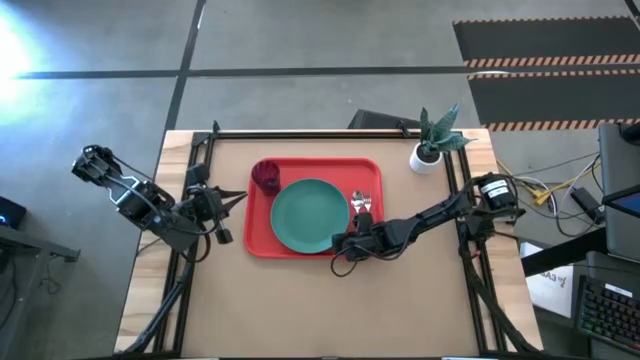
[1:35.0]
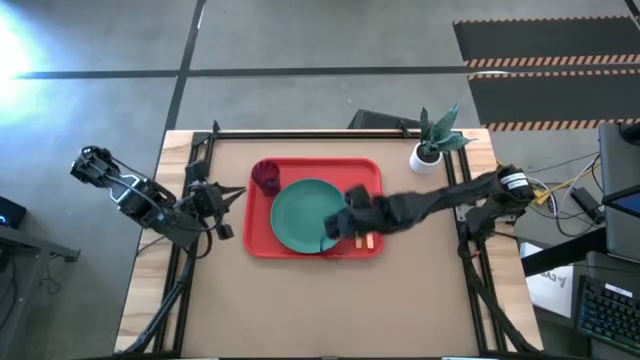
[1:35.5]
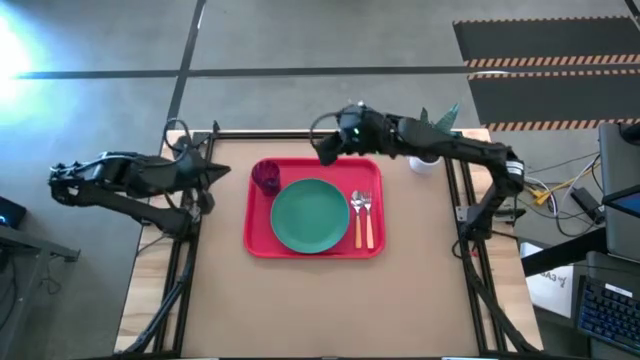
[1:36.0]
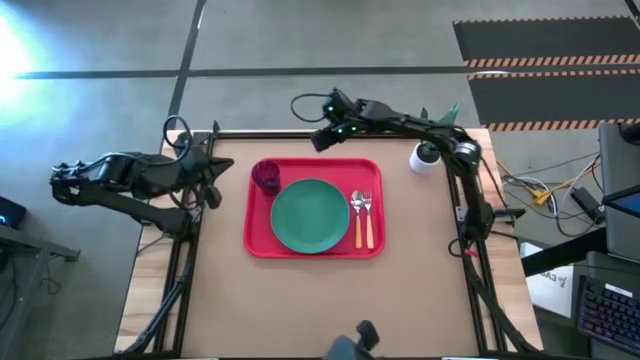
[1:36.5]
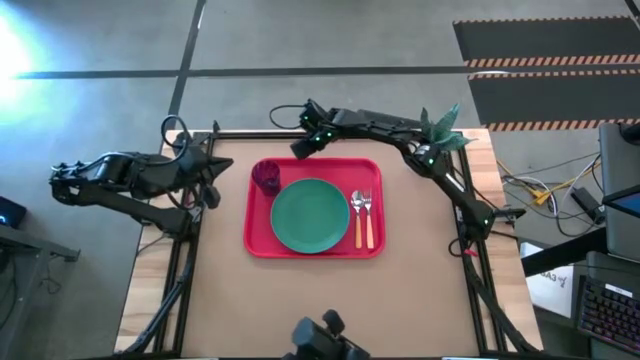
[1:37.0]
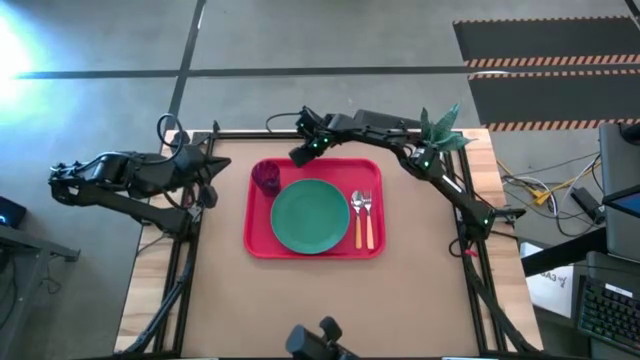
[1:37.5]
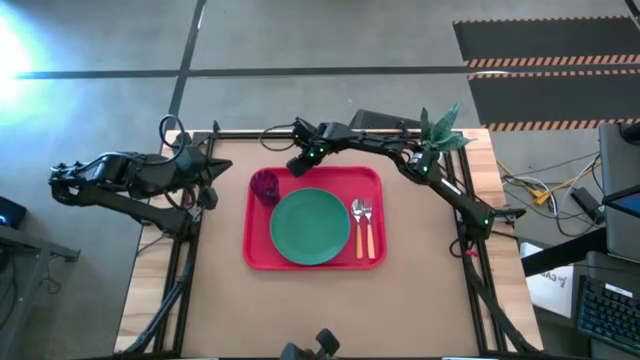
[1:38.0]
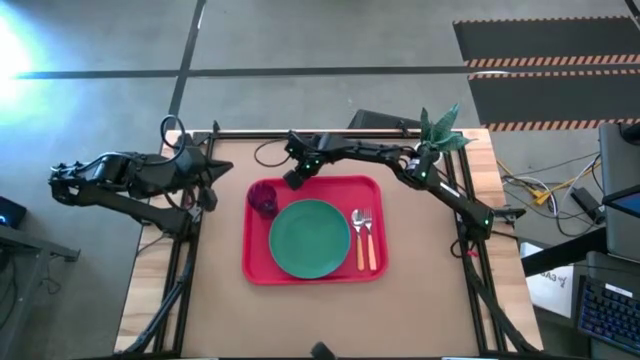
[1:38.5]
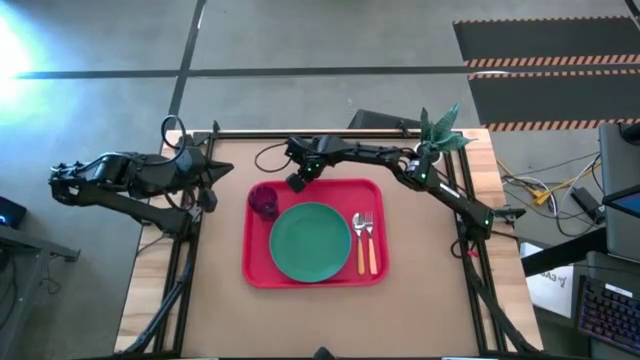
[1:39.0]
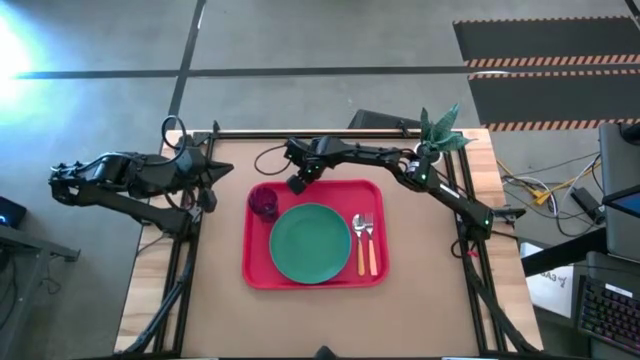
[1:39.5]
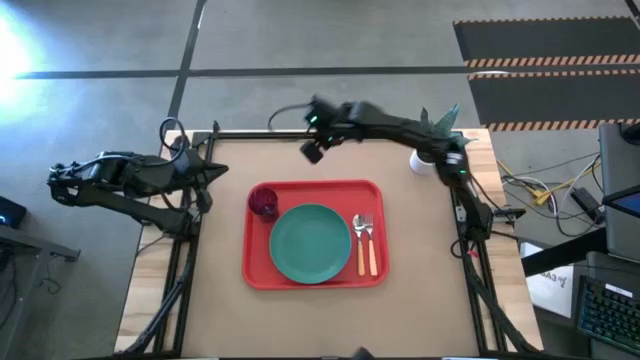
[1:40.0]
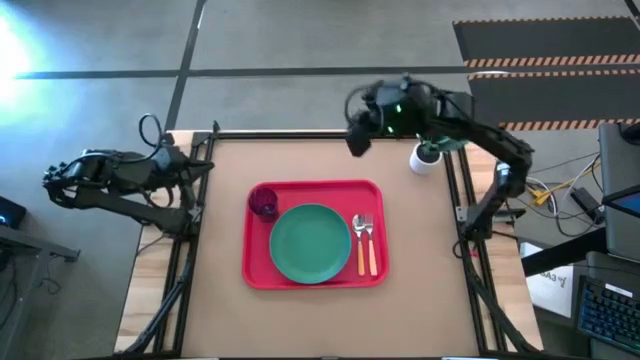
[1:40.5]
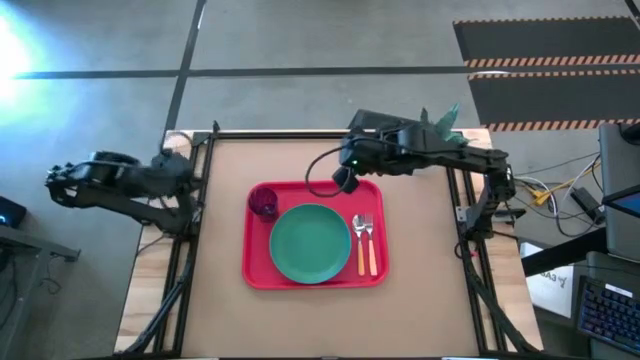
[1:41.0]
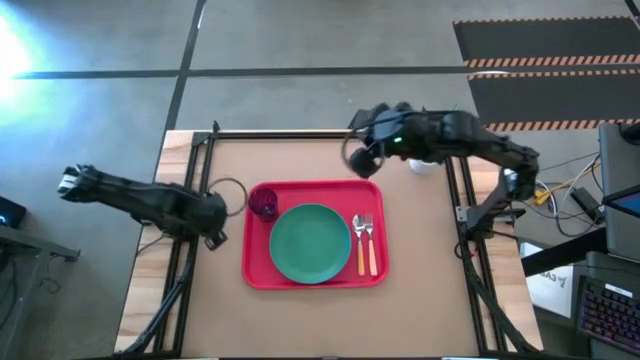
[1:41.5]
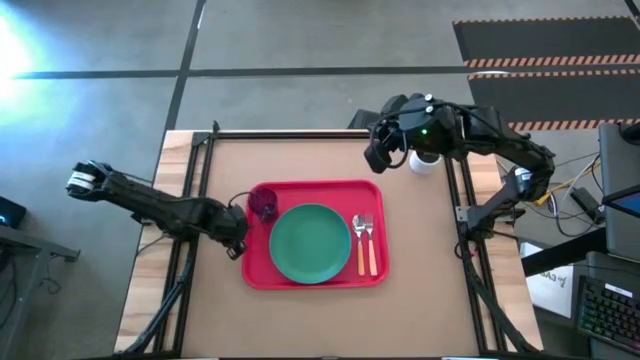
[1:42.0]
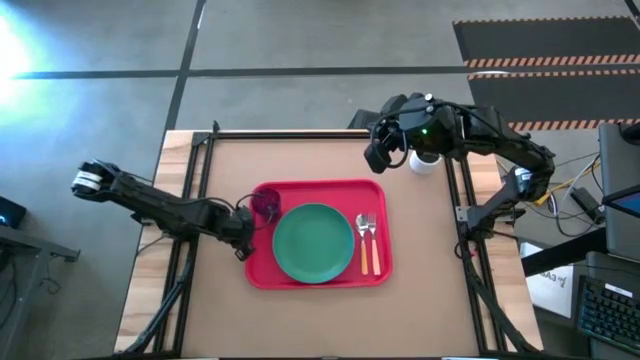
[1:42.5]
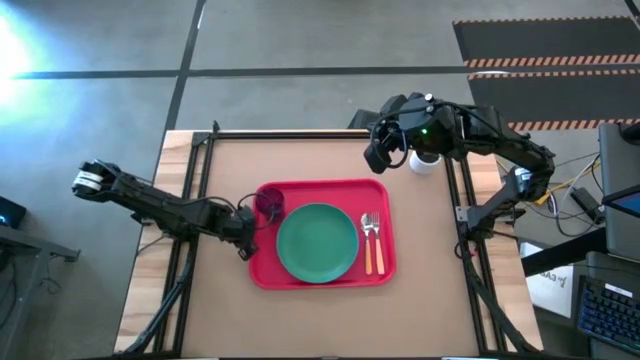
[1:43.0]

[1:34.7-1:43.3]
Task: Pick and place plate/cup/fork/spoon on tray
Move the orange tray to the center of the table

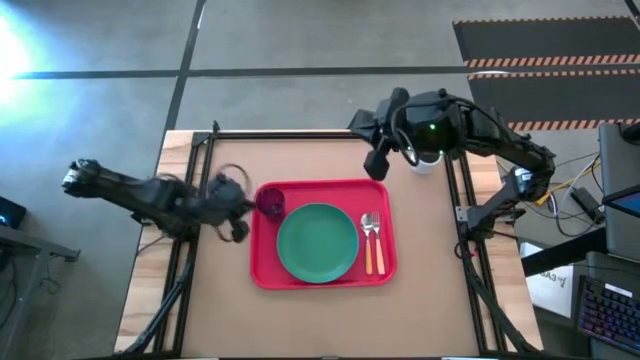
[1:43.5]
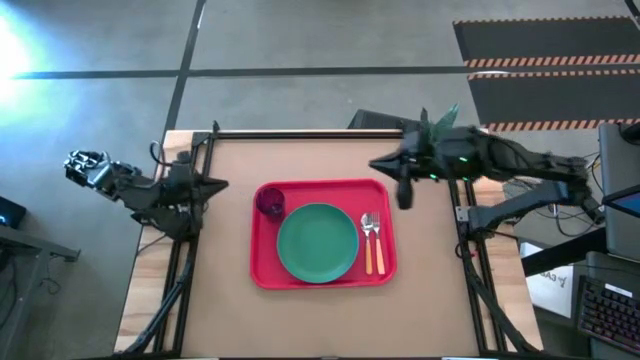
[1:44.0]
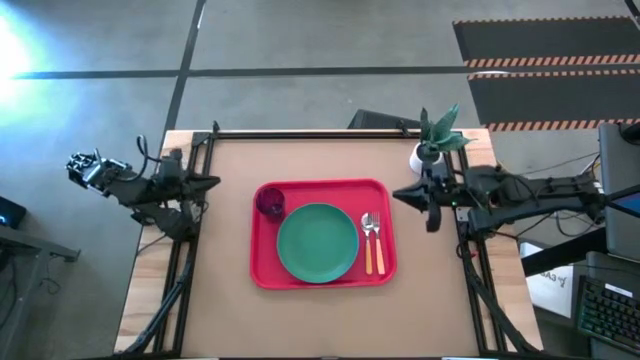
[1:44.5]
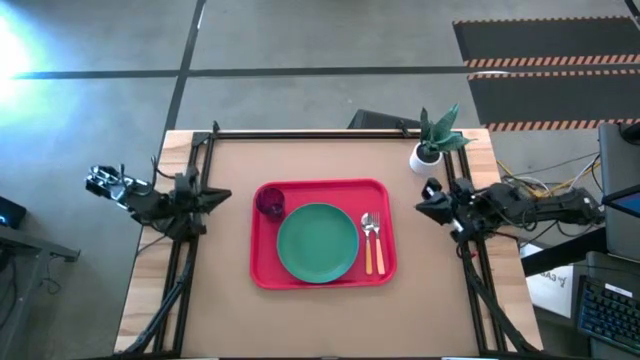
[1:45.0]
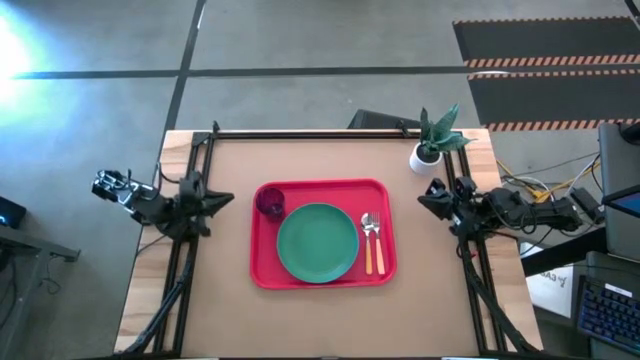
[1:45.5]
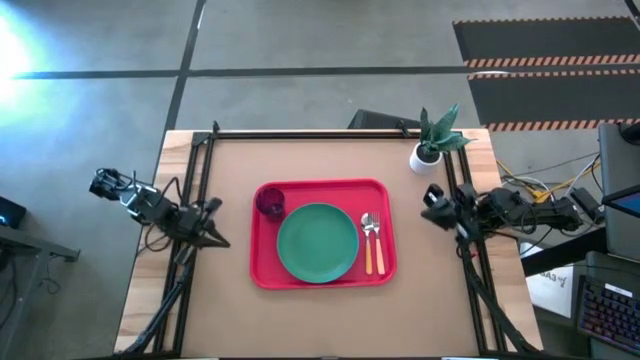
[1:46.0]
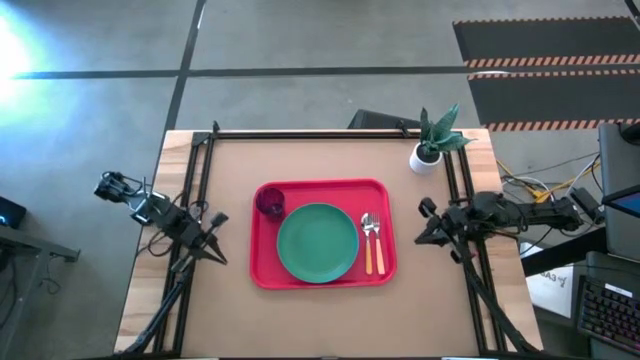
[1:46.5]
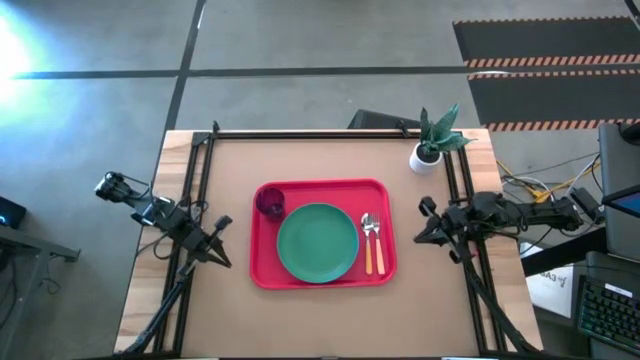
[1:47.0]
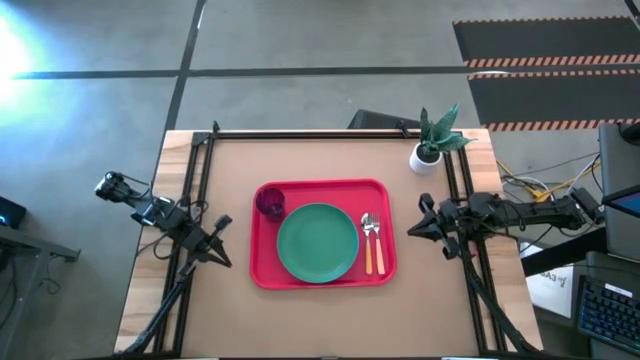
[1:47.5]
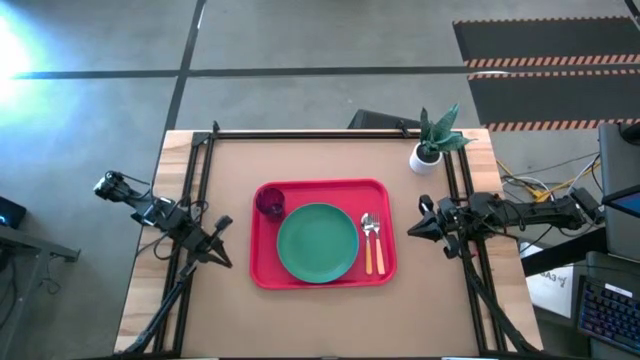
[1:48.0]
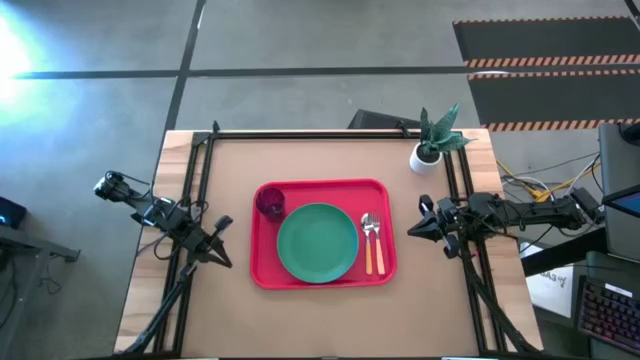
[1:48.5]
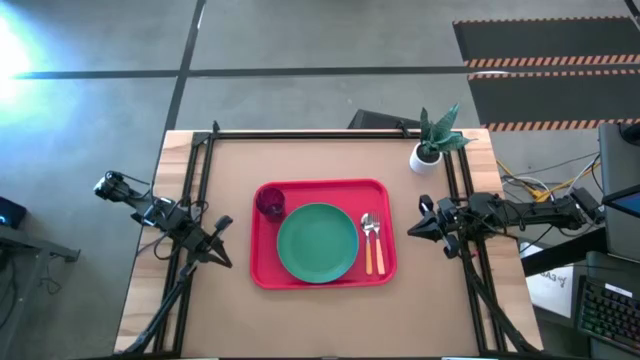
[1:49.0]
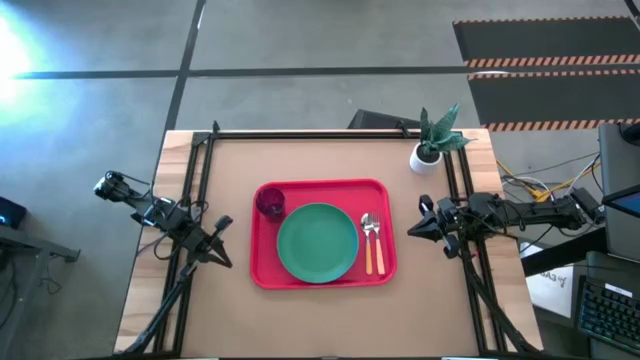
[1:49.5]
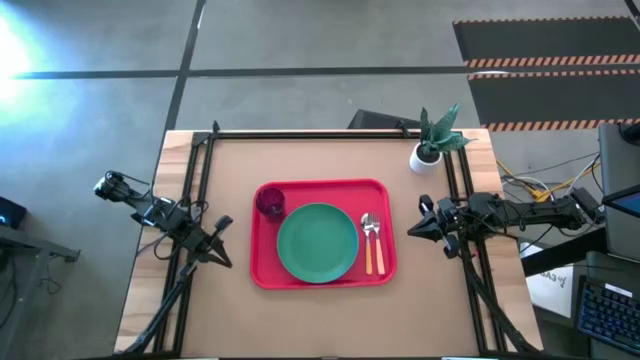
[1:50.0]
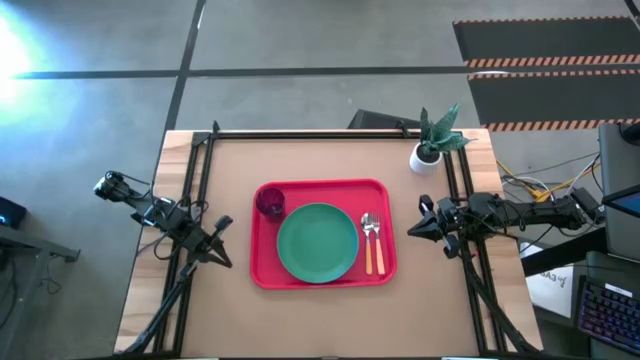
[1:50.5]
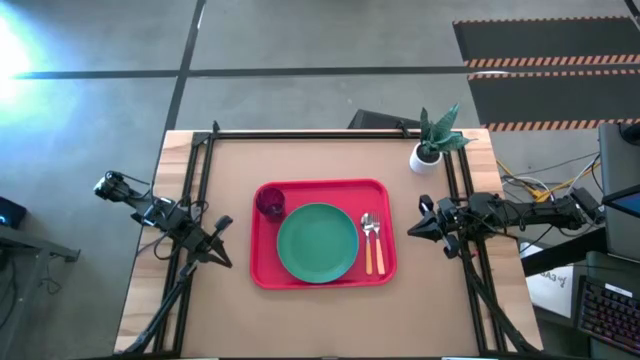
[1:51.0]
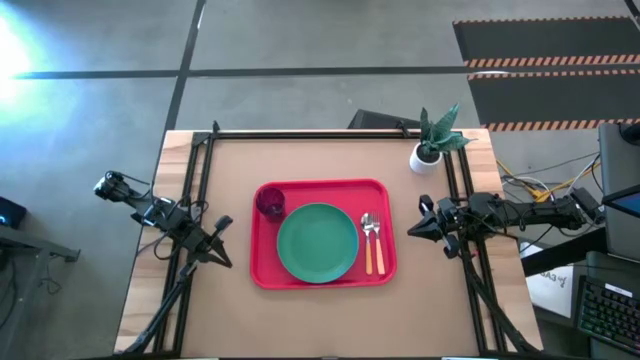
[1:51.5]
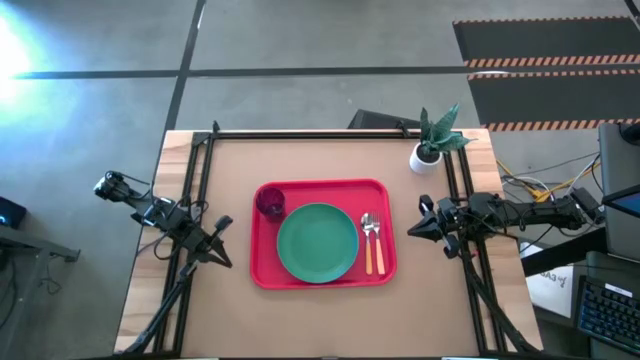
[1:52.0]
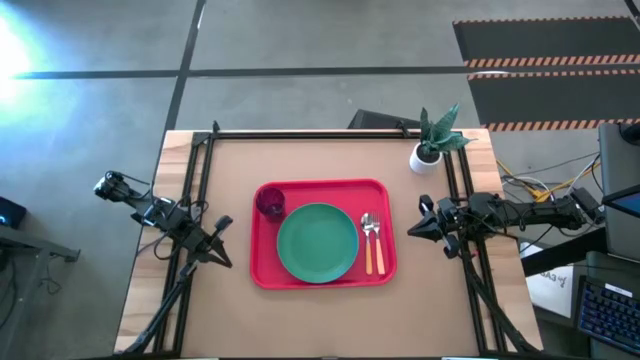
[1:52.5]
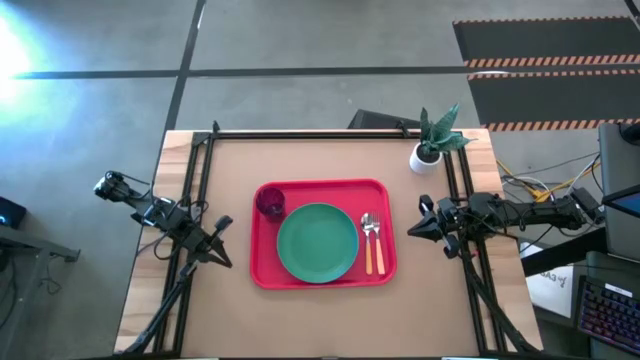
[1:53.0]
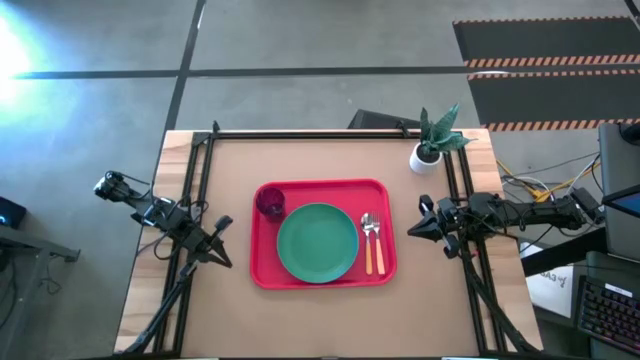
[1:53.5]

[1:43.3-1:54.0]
Return to Home Position
